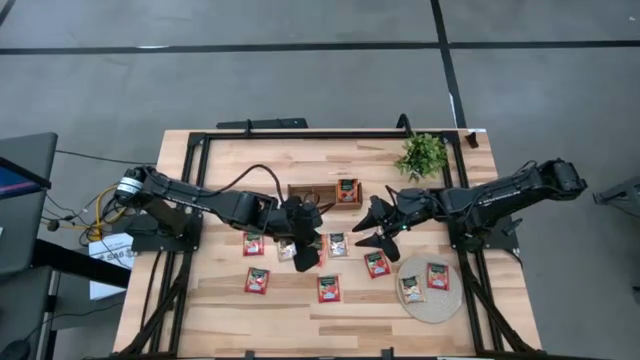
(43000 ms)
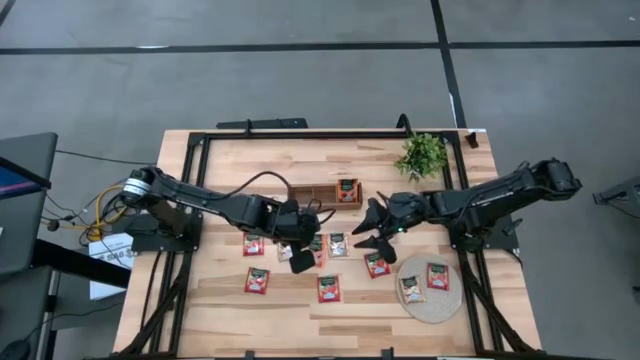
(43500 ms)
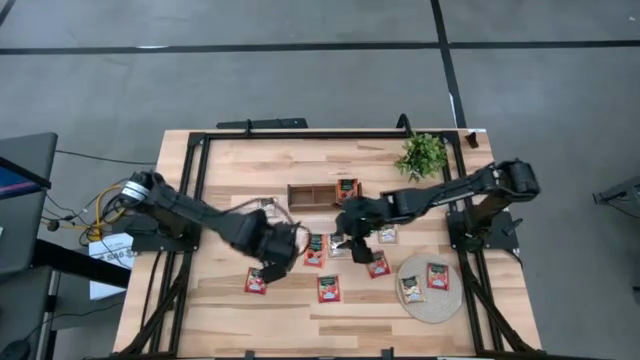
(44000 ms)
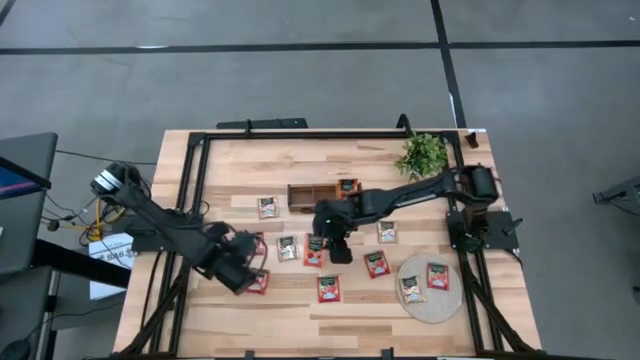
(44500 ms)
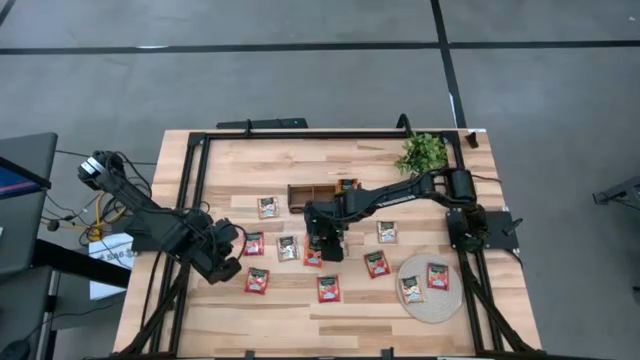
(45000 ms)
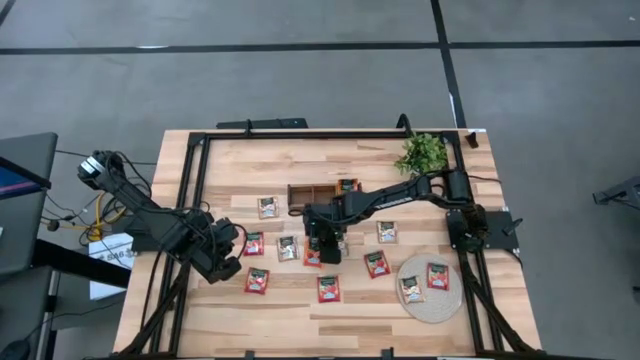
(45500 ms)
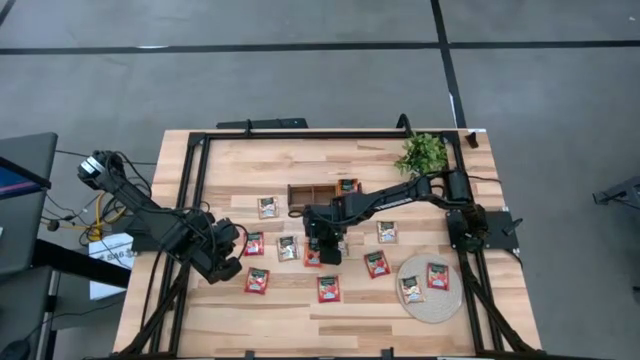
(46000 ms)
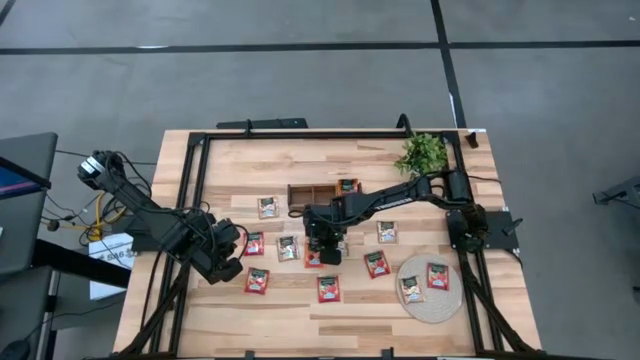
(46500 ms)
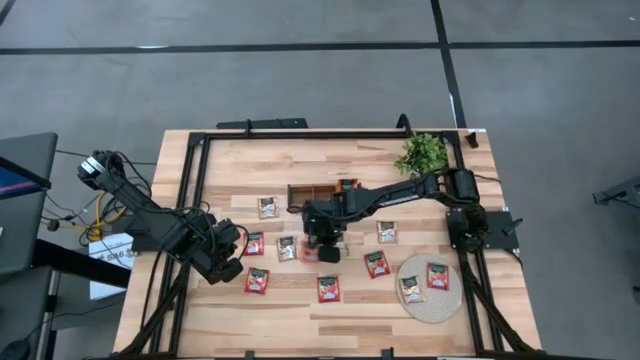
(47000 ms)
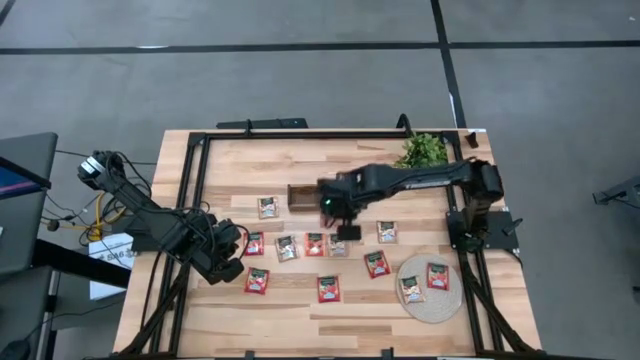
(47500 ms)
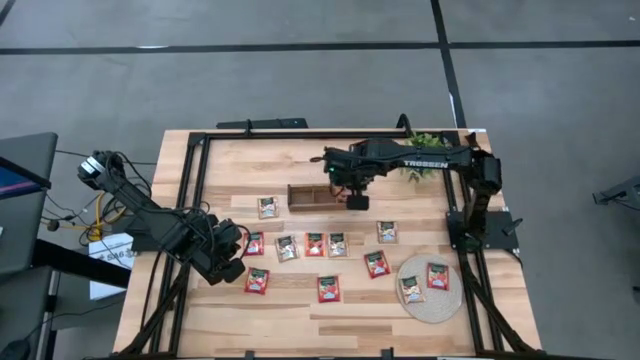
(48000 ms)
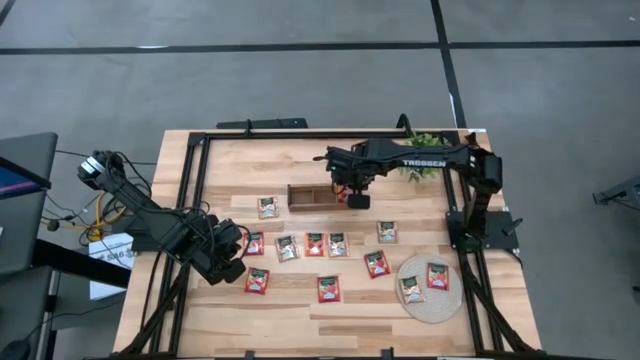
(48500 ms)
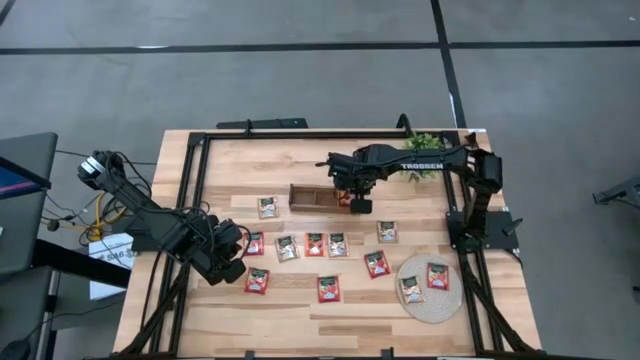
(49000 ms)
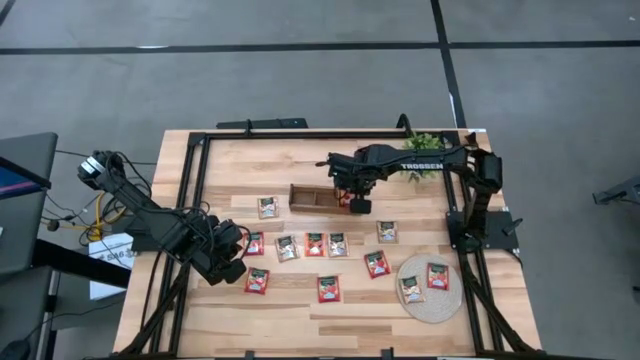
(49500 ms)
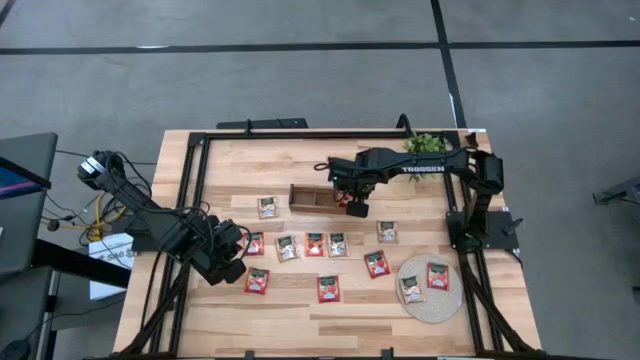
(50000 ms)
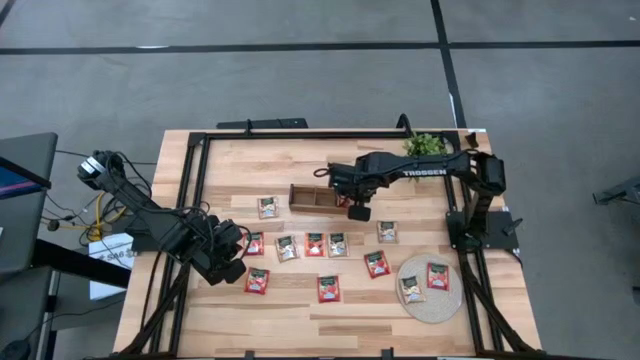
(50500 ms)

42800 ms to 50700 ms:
Task: Pick & Place Tea
Put the orange tea bag into the right section of the wooden organizer

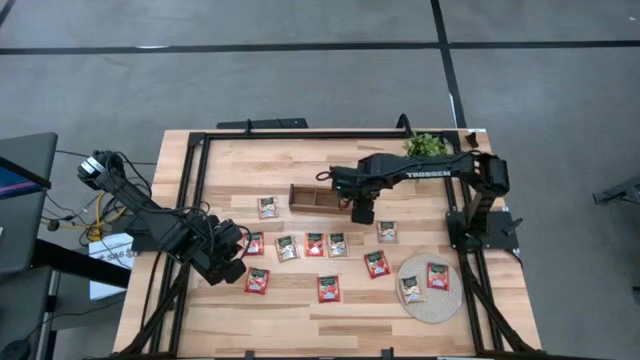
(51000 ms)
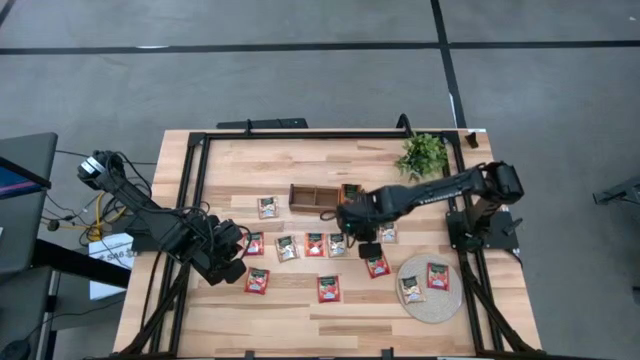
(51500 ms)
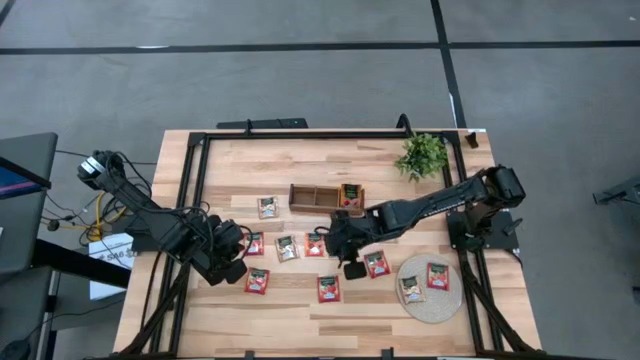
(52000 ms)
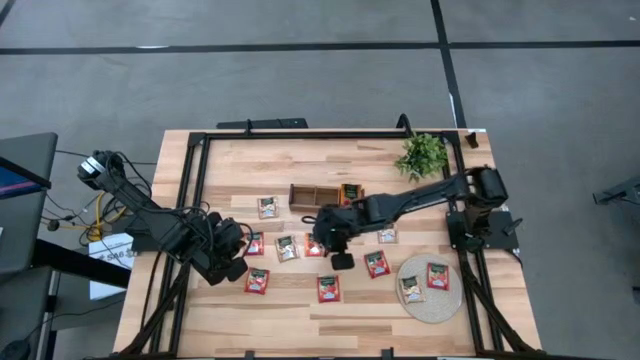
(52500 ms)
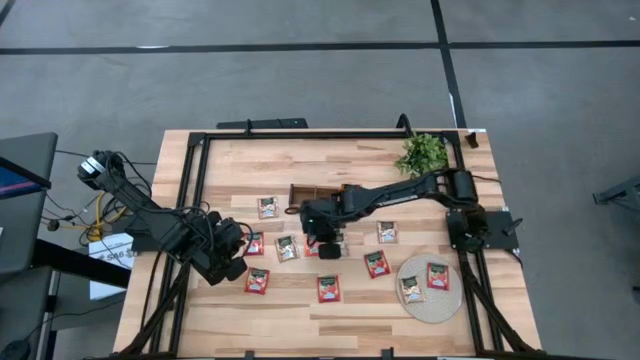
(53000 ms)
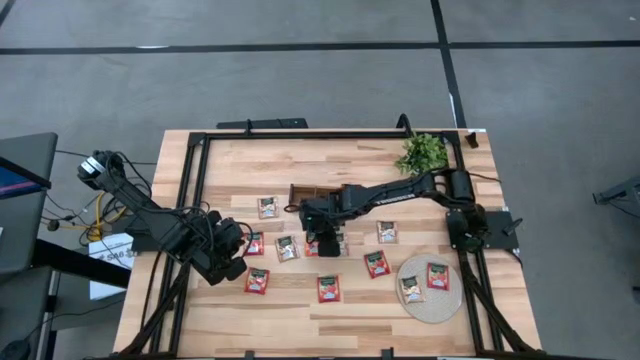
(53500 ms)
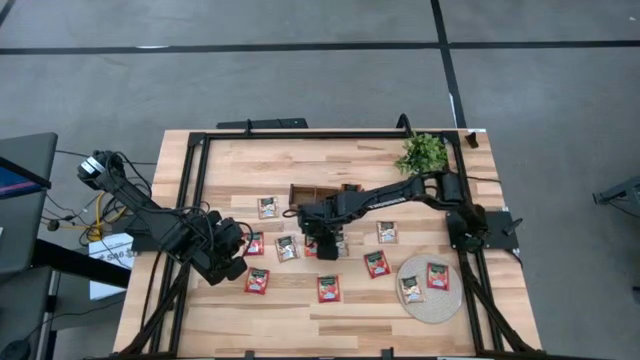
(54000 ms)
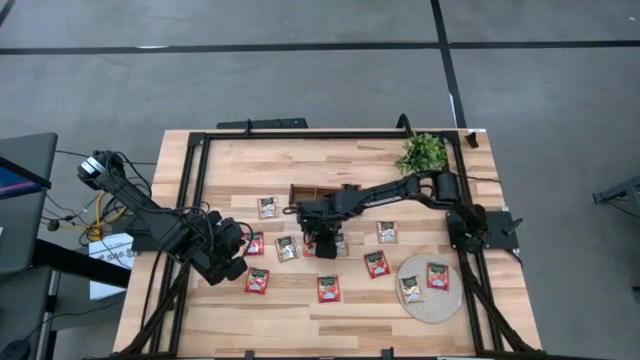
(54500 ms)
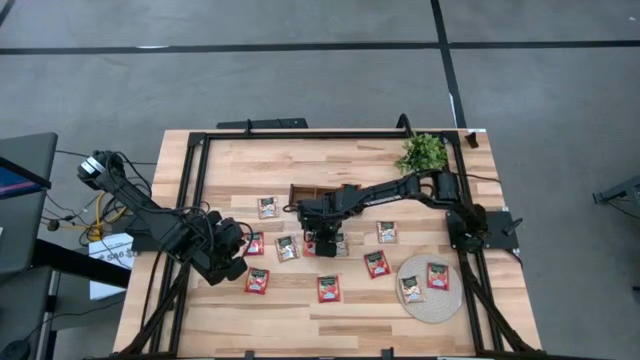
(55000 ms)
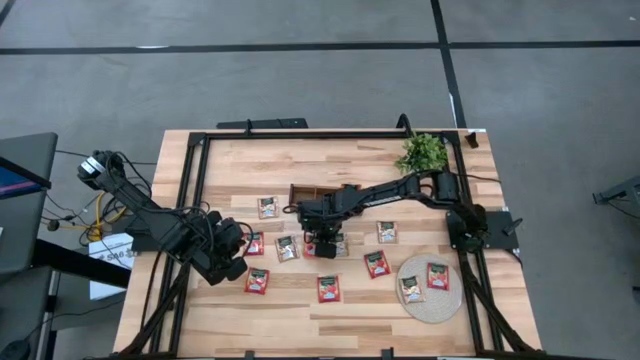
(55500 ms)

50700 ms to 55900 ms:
Put the orange tea bag into the right section of the wooden organizer

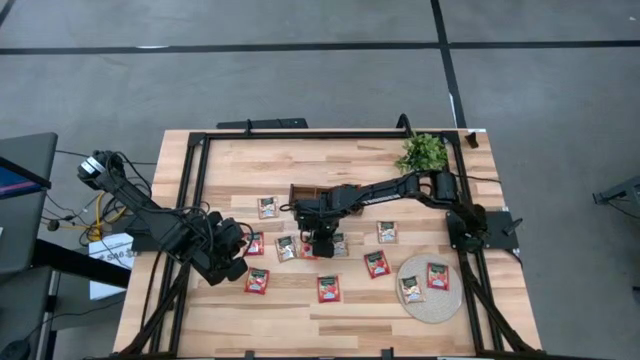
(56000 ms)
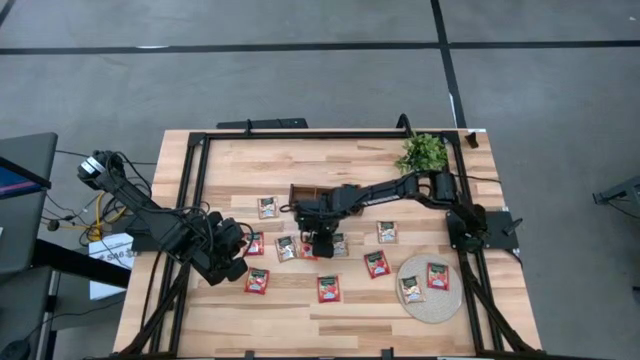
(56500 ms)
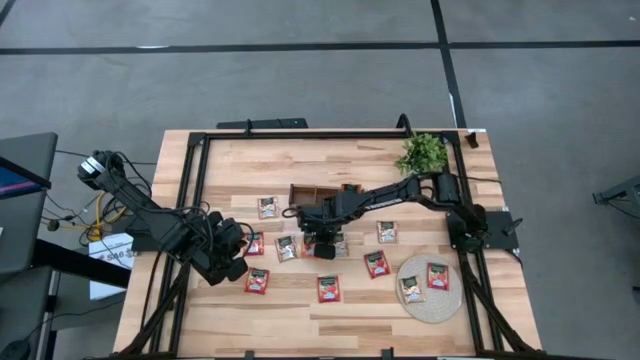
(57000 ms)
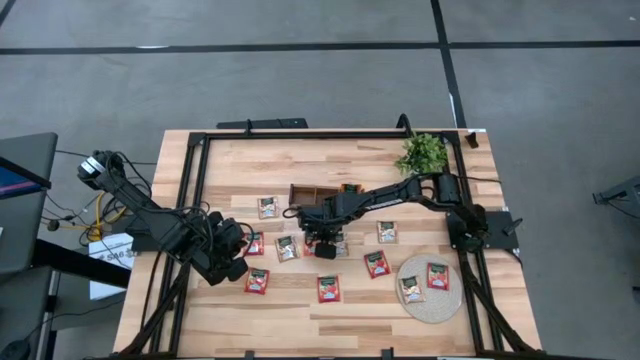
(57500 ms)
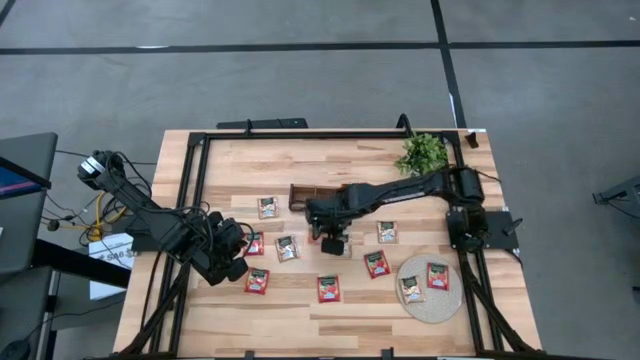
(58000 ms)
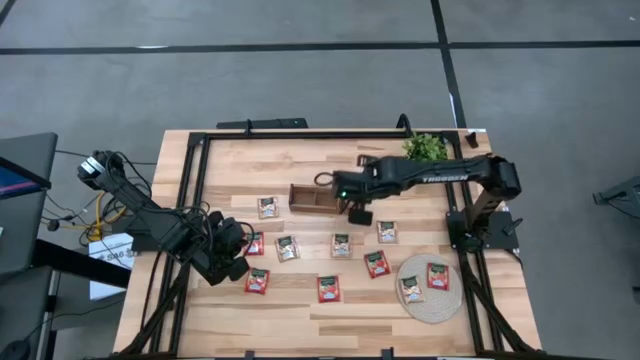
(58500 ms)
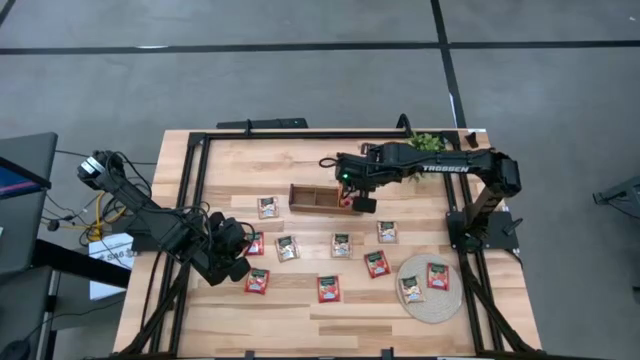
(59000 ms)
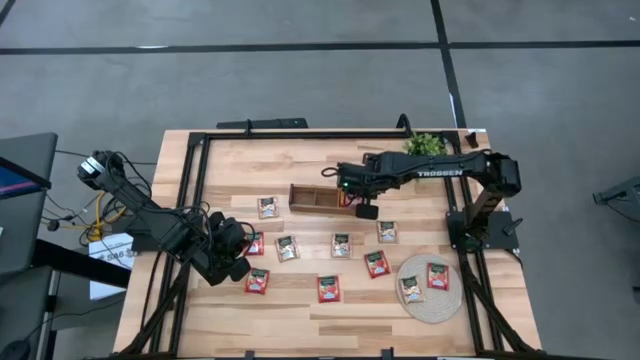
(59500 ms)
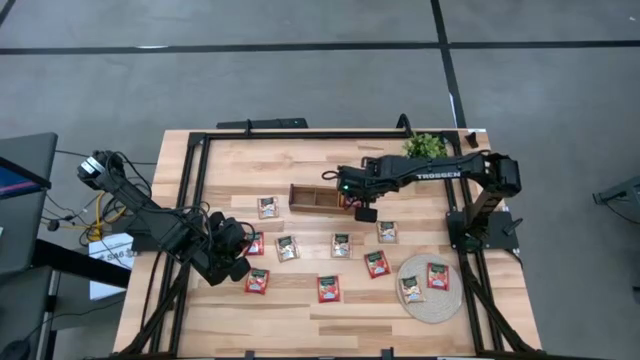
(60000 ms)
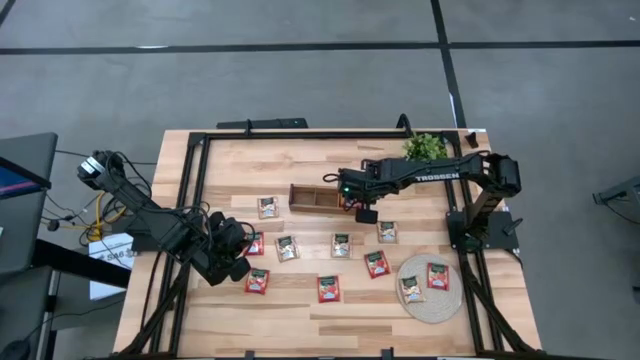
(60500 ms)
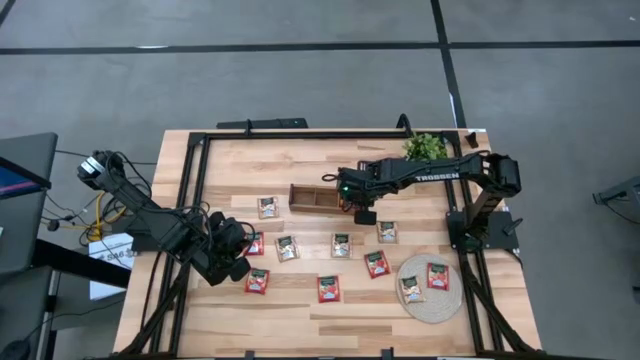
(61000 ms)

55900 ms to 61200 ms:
Put the orange tea bag into the right section of the wooden organizer

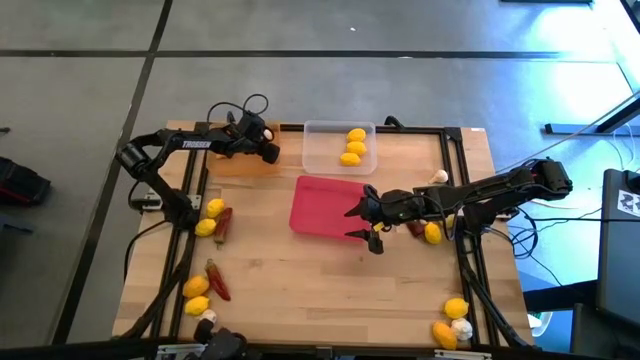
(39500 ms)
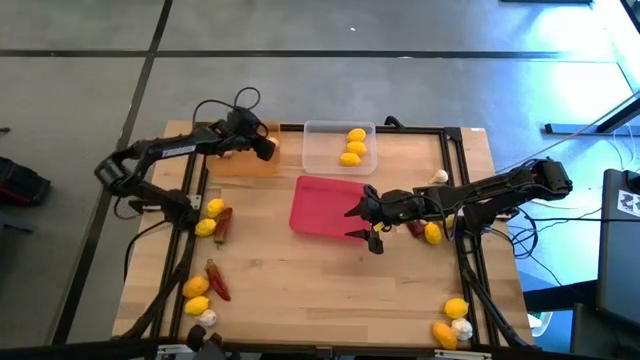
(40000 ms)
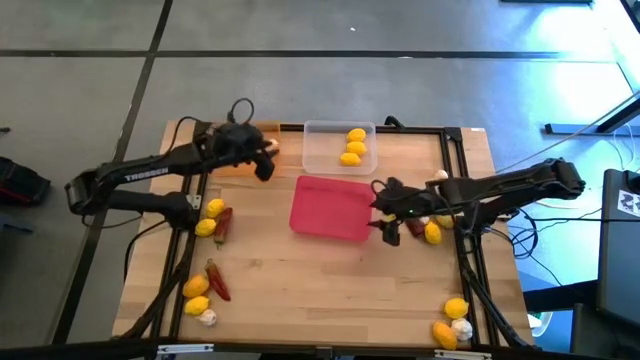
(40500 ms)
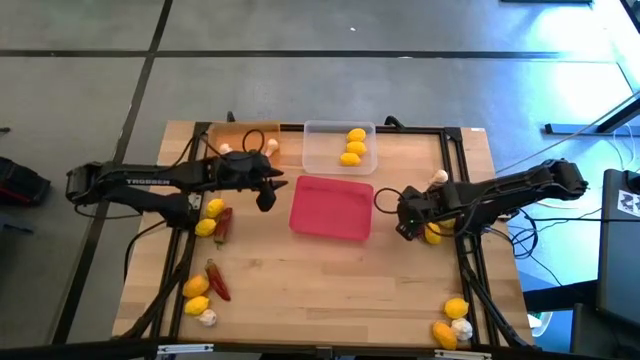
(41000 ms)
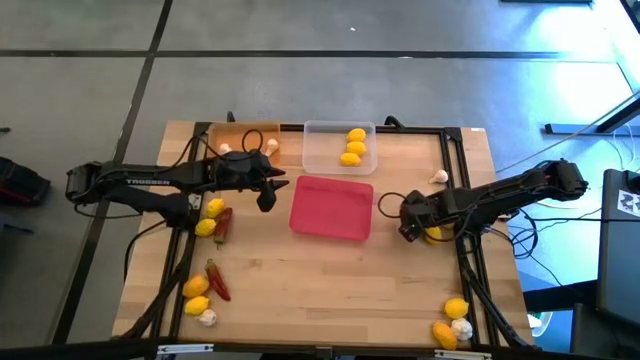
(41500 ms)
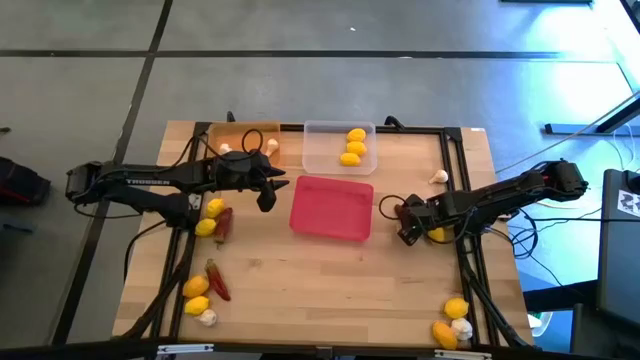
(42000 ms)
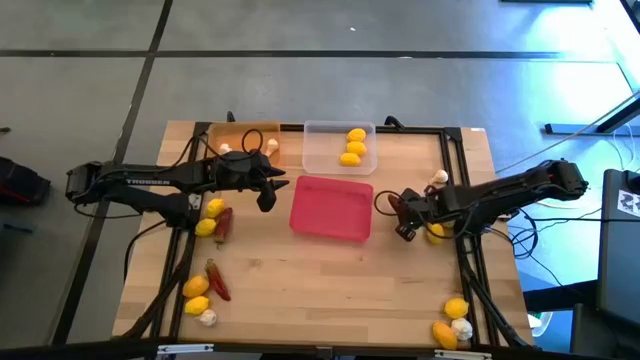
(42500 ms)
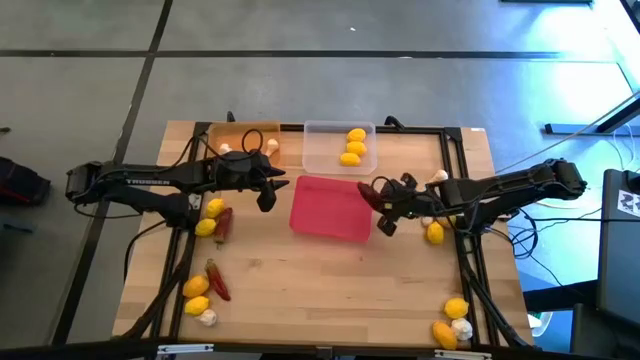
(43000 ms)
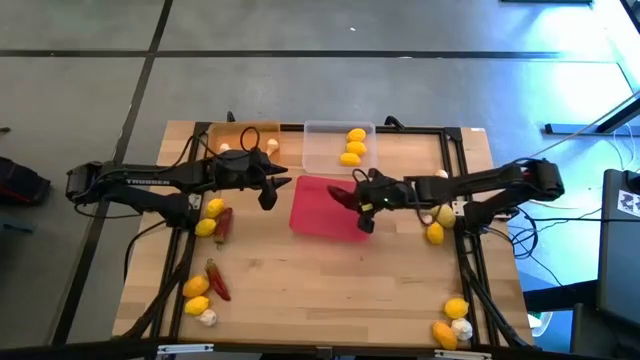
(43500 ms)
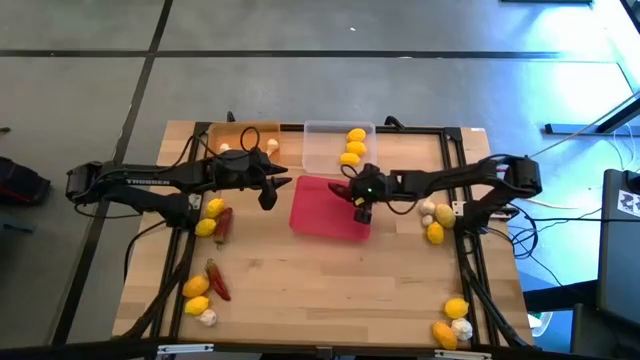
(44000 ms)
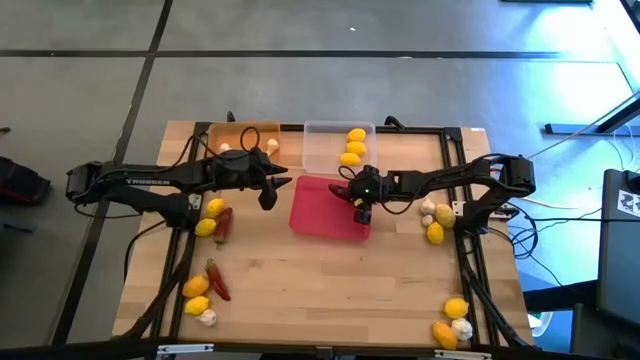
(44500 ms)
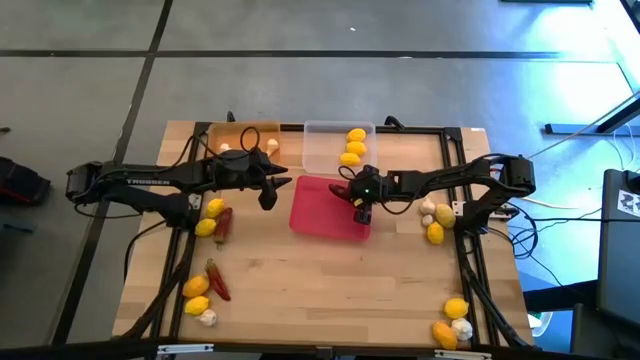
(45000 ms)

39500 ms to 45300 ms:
Task: Sort produce into baskets
Put the red chili pepper in the red bin
